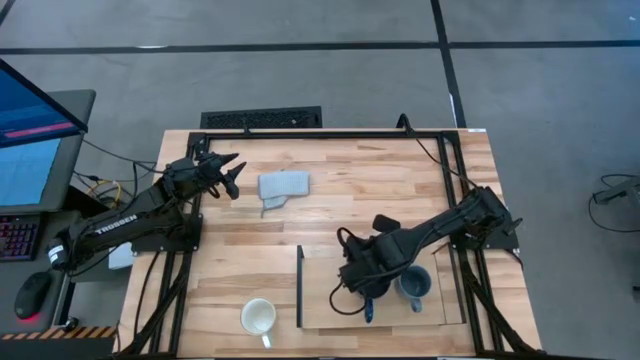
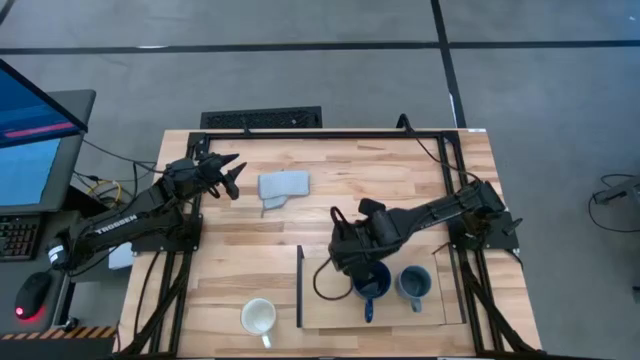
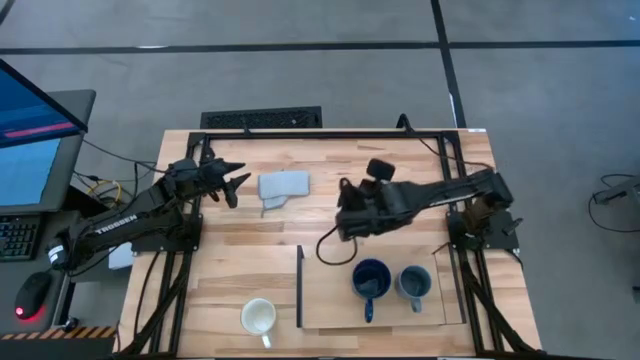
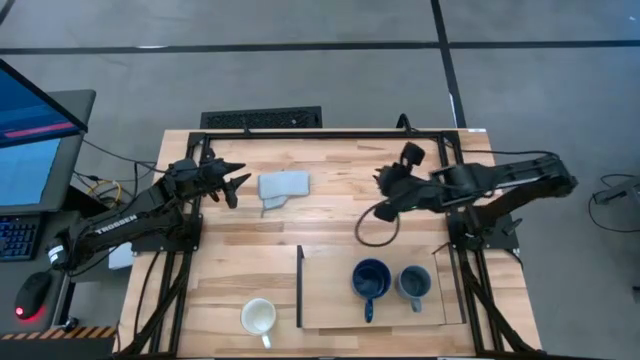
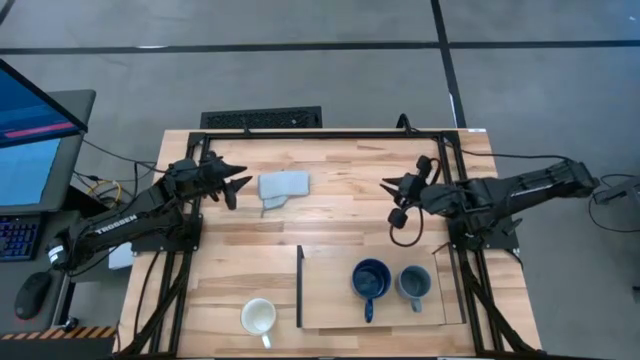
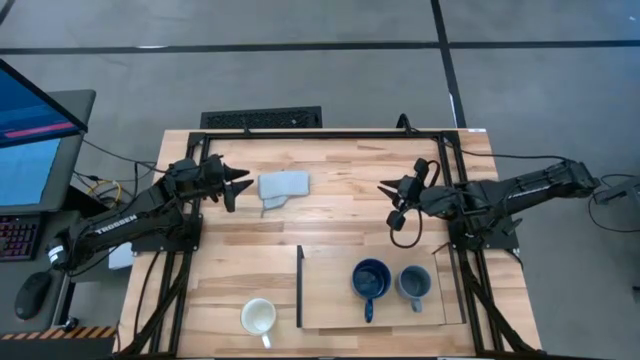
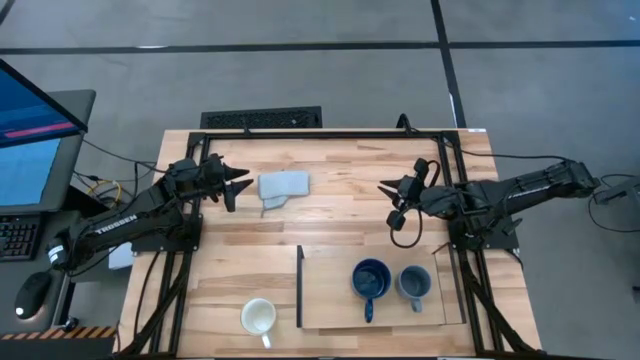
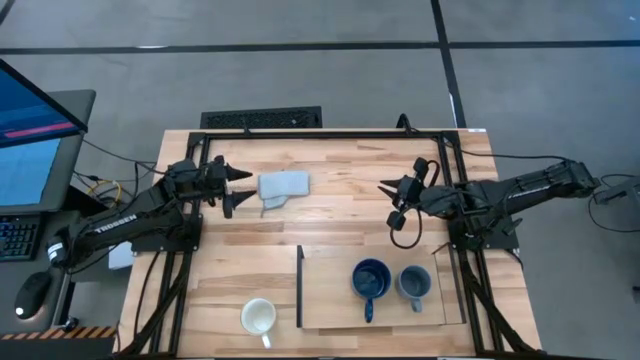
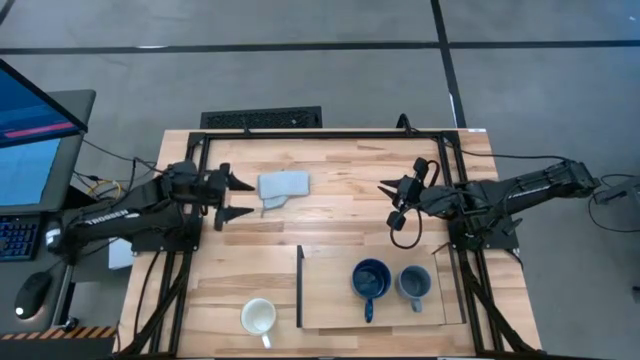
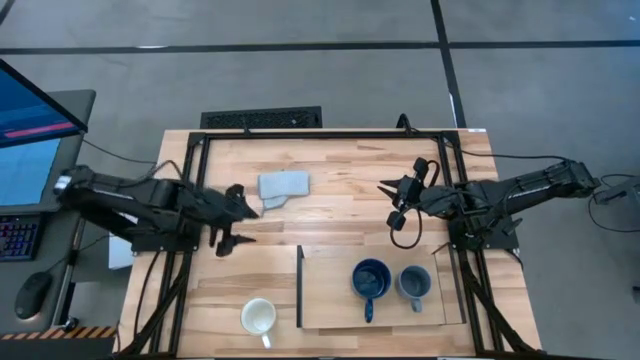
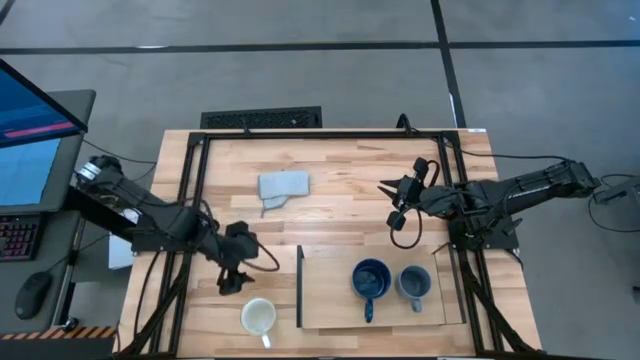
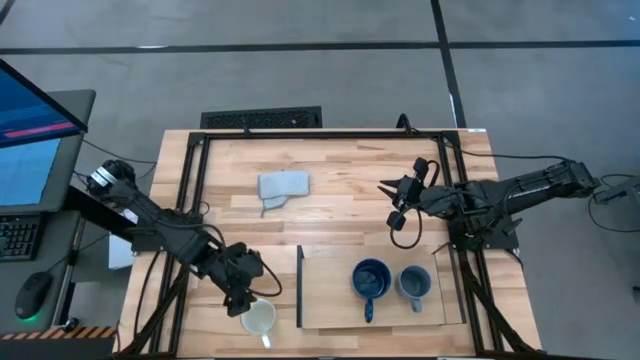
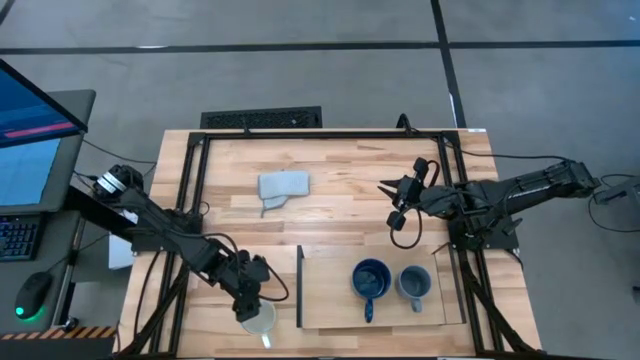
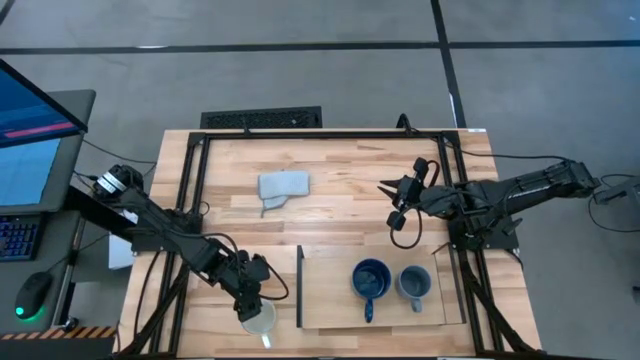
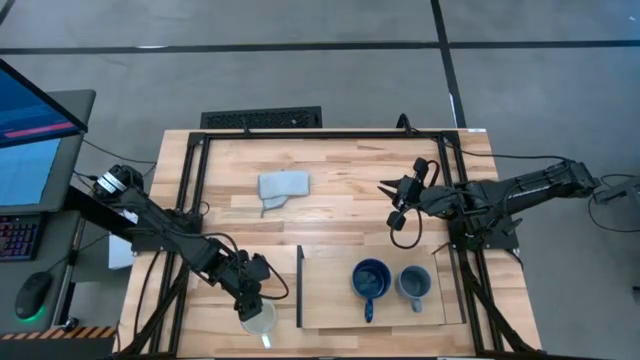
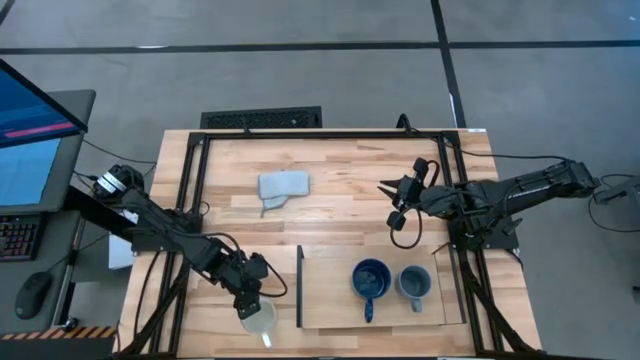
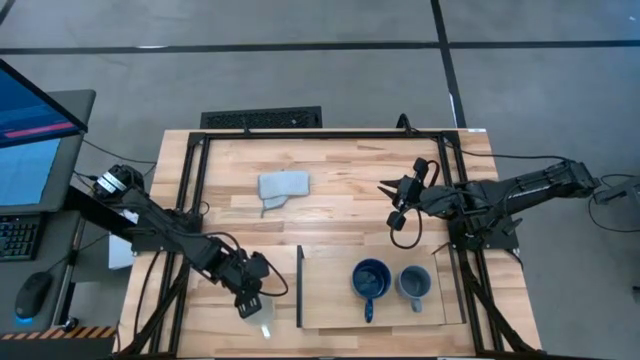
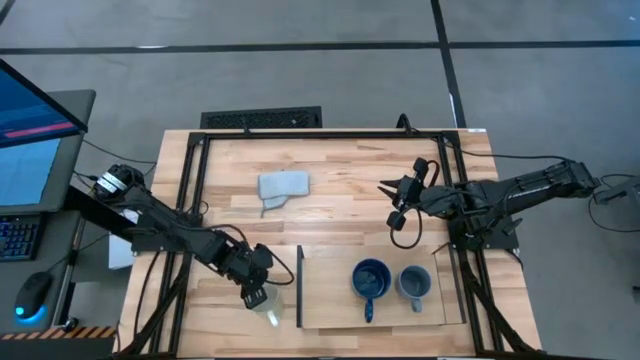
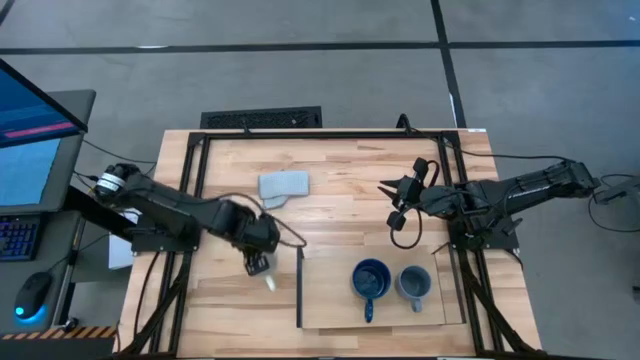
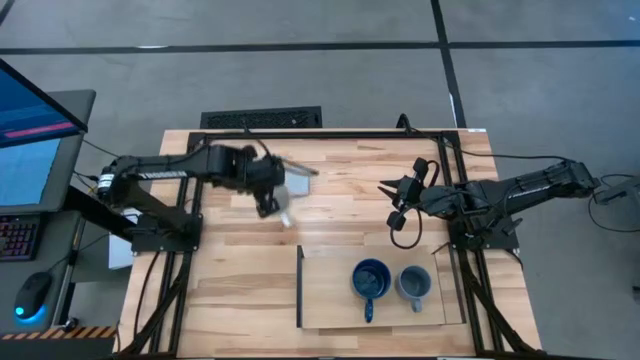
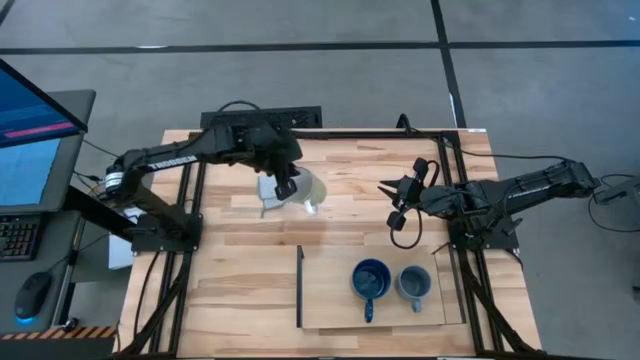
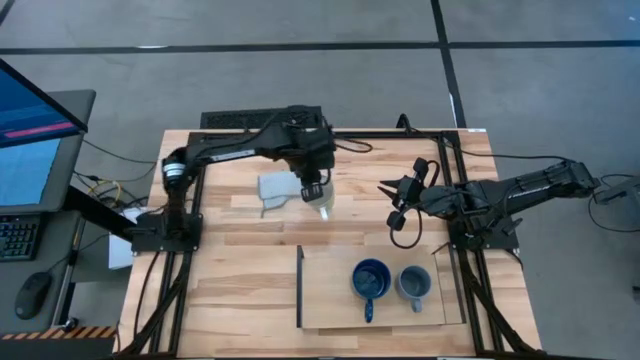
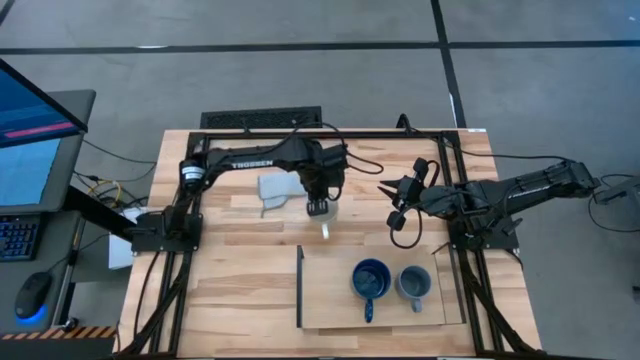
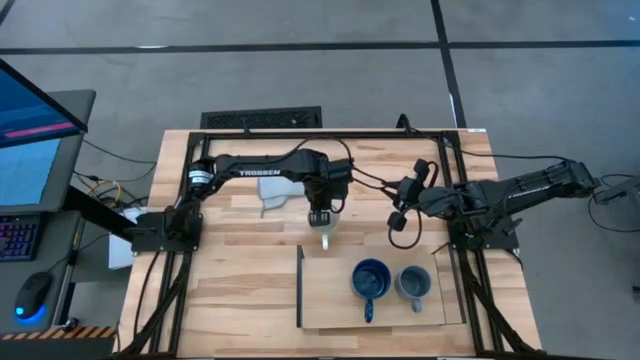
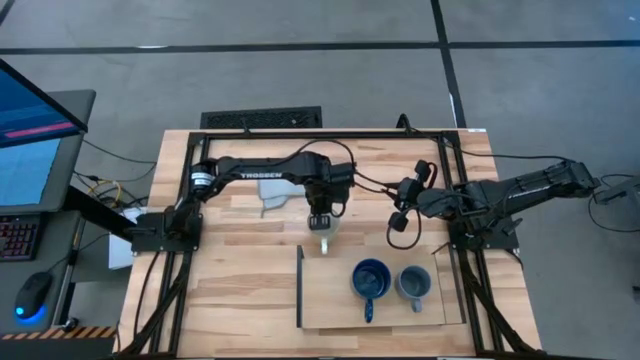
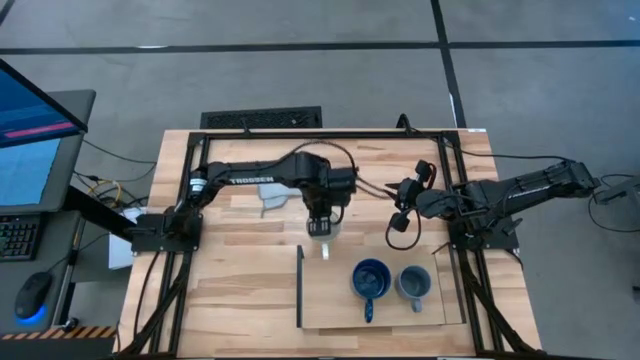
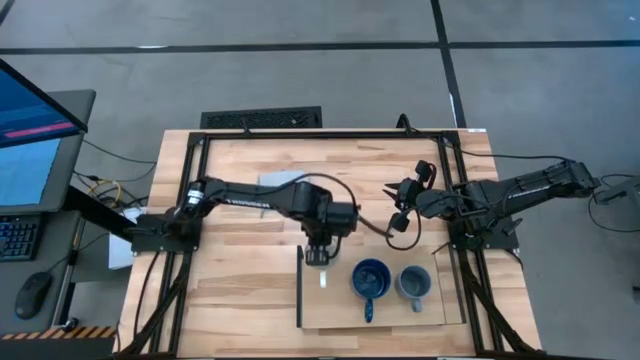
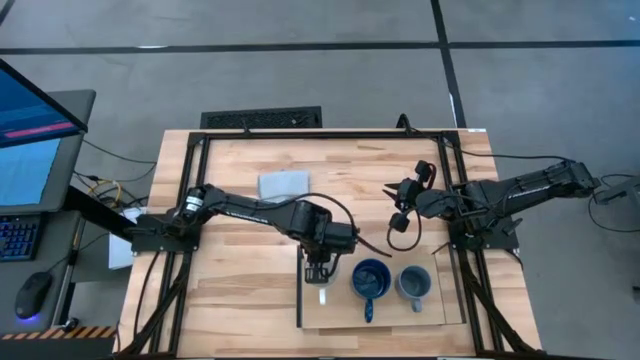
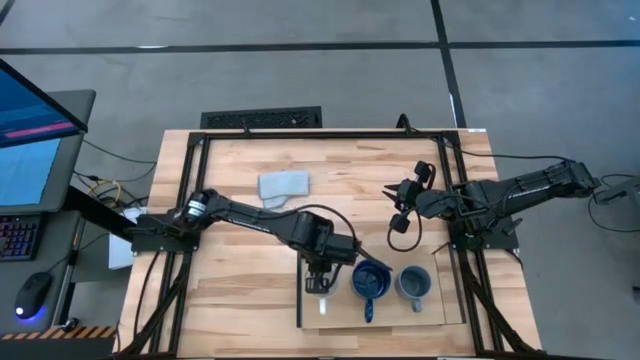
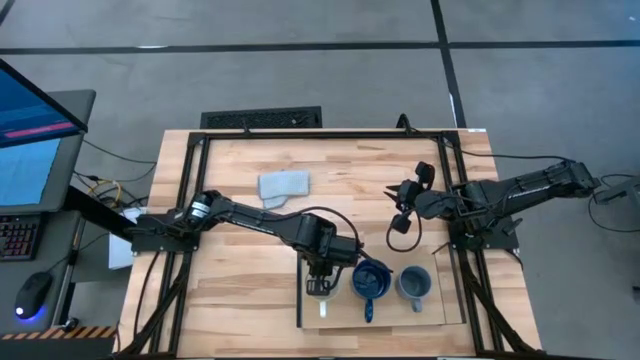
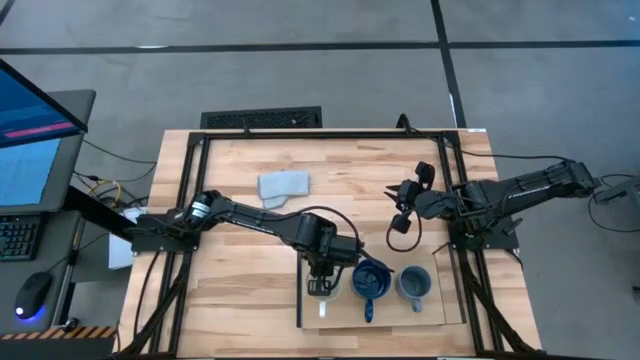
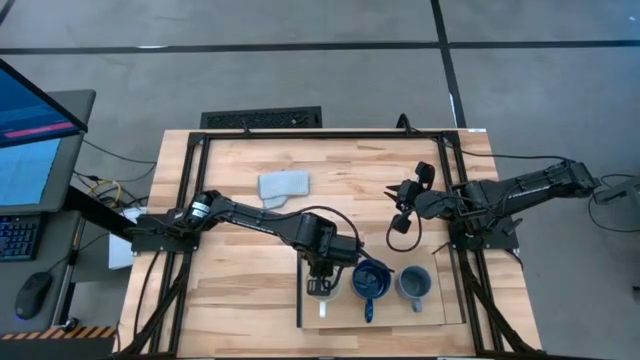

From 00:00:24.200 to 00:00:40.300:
Task: Stack small to large cups/mugs on shelf
Put the green mug on the shelf

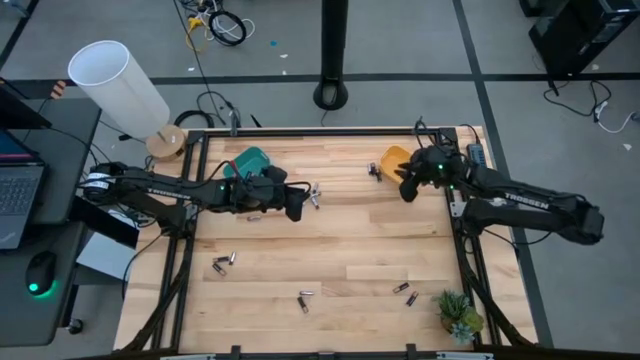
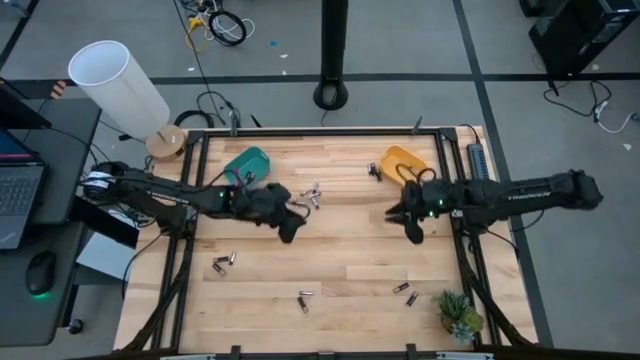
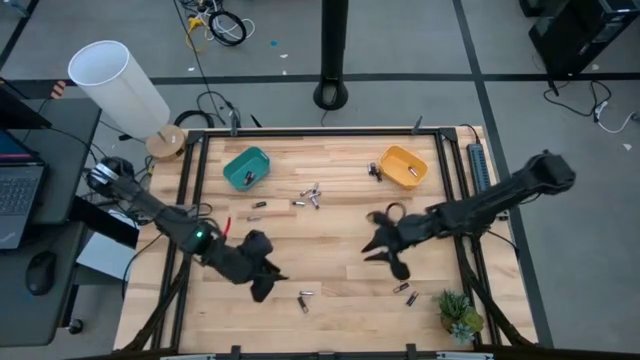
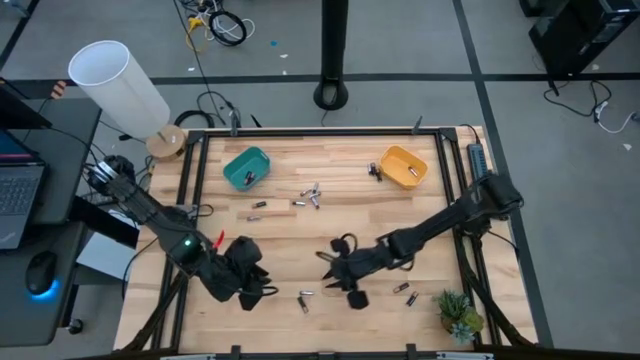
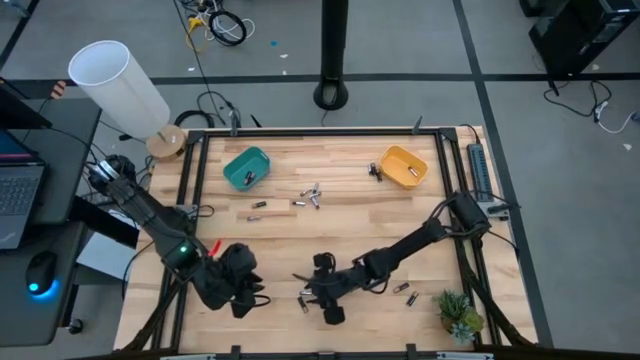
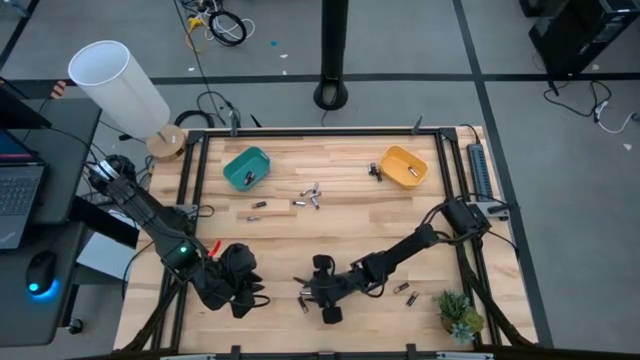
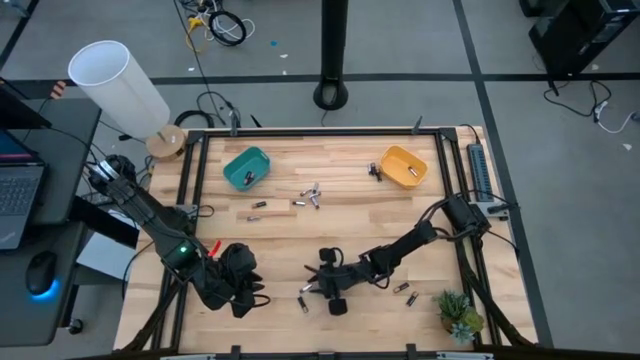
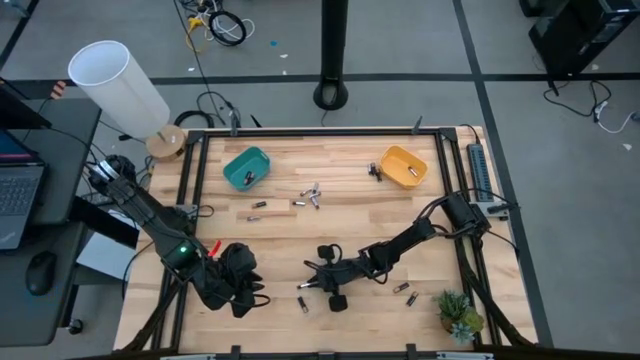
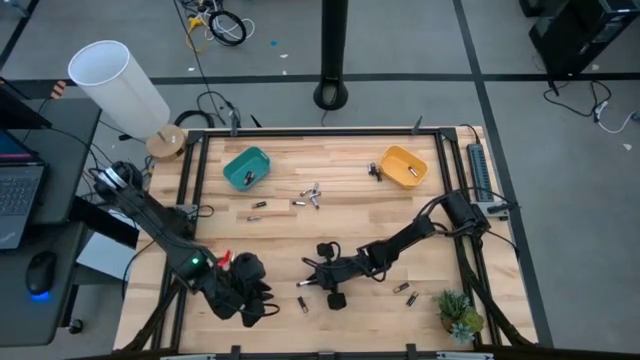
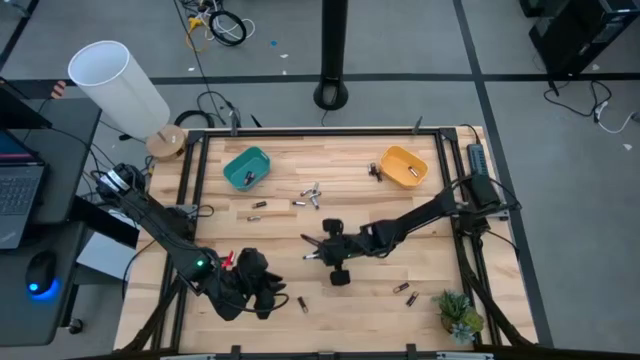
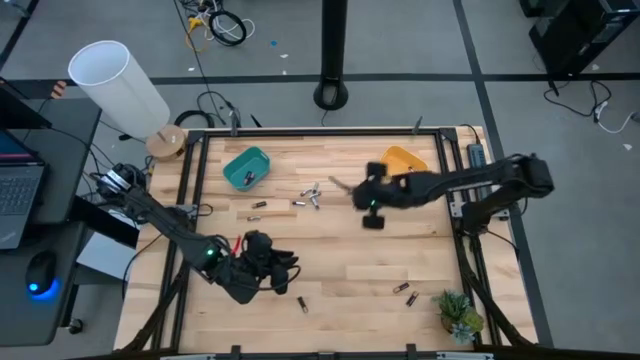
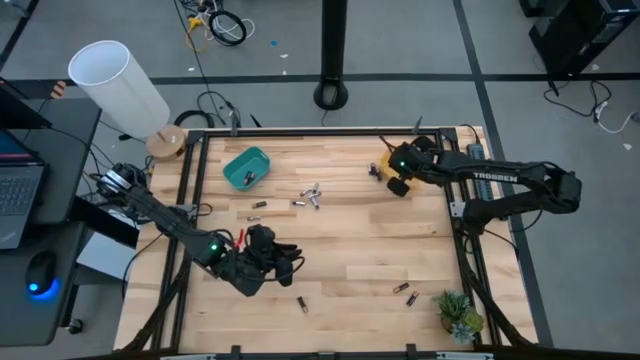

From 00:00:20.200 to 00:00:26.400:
Task: Sort batteries
Put the silver battery into the yellow bin
